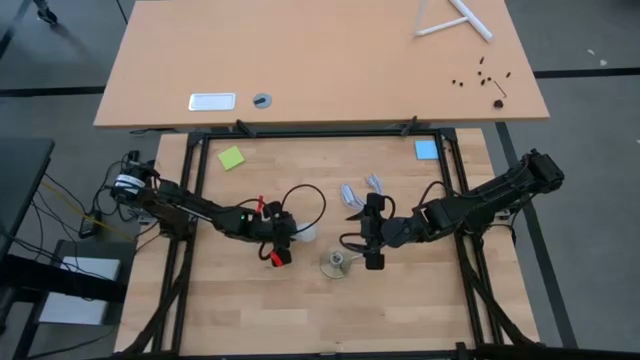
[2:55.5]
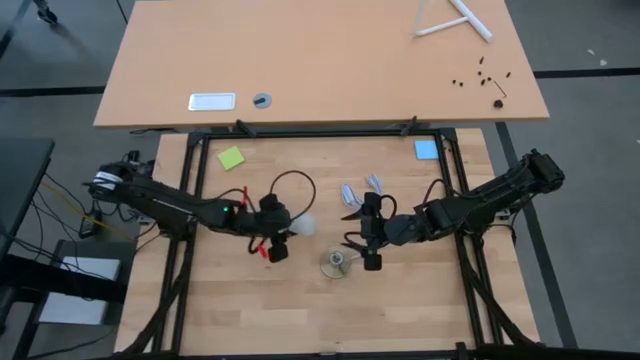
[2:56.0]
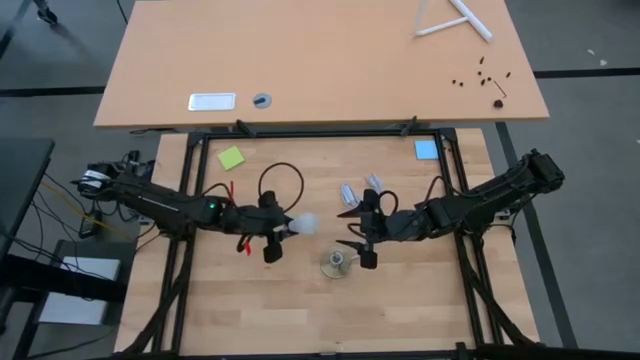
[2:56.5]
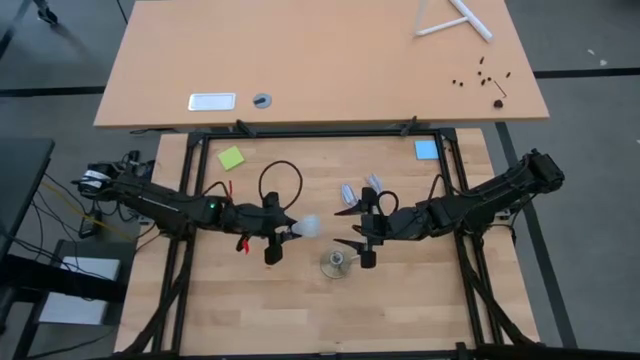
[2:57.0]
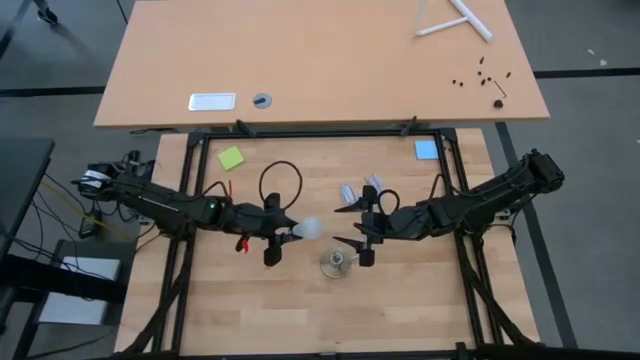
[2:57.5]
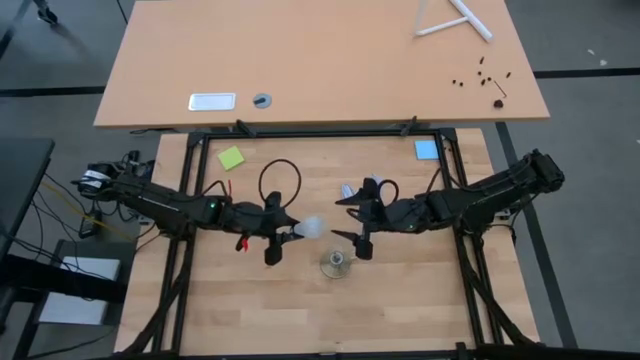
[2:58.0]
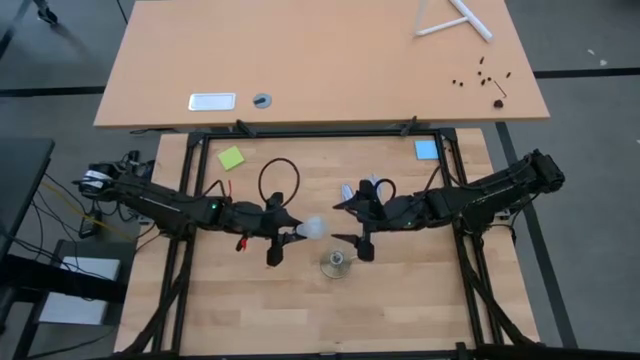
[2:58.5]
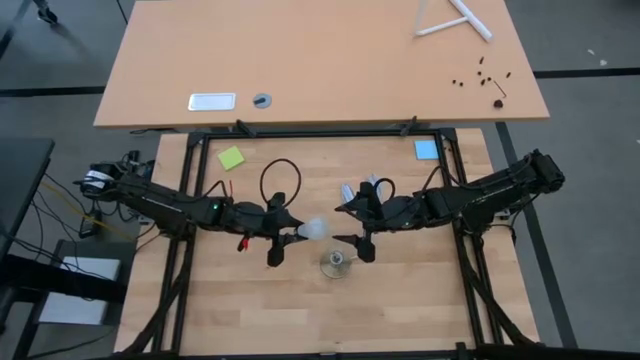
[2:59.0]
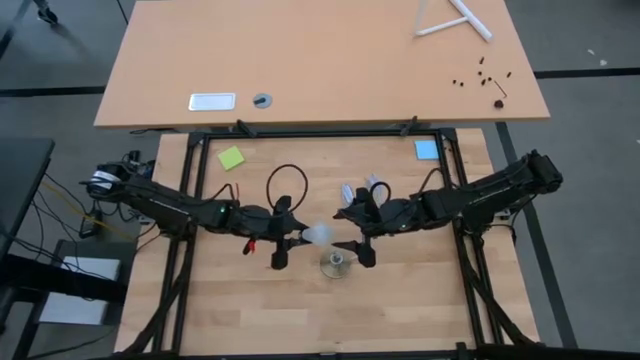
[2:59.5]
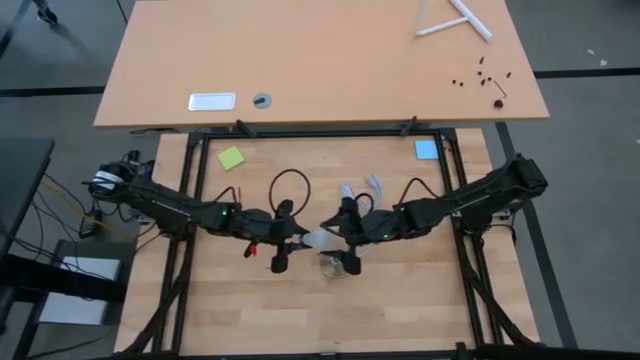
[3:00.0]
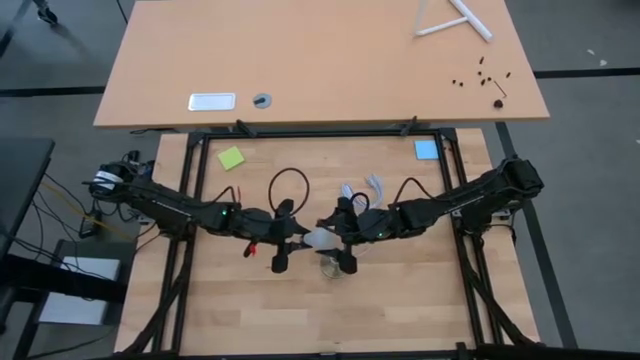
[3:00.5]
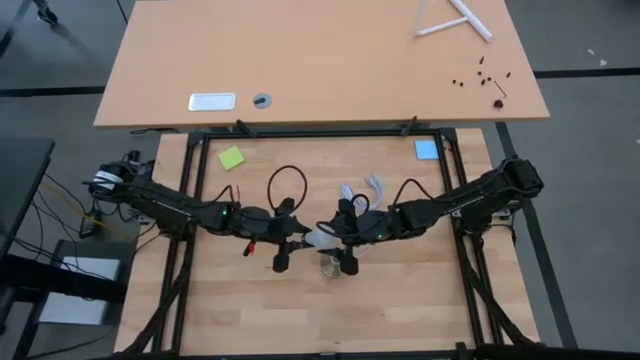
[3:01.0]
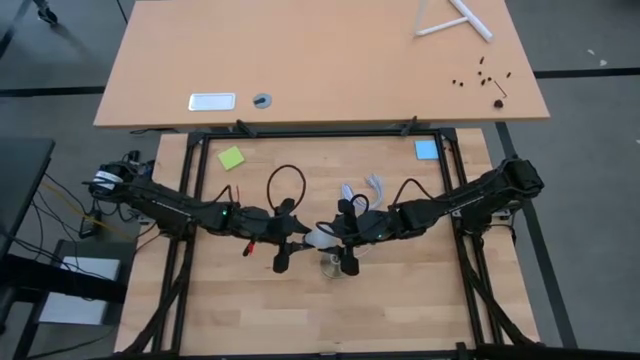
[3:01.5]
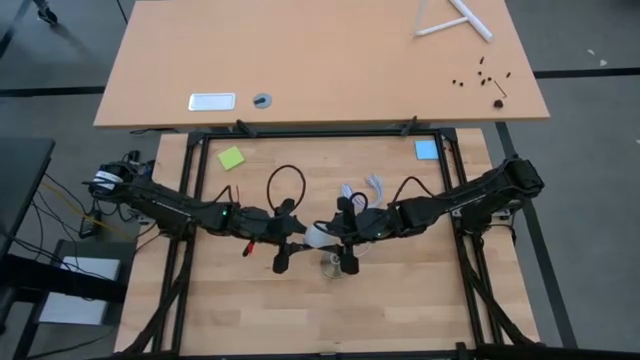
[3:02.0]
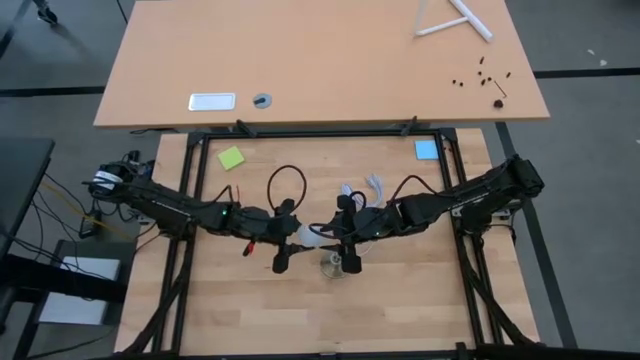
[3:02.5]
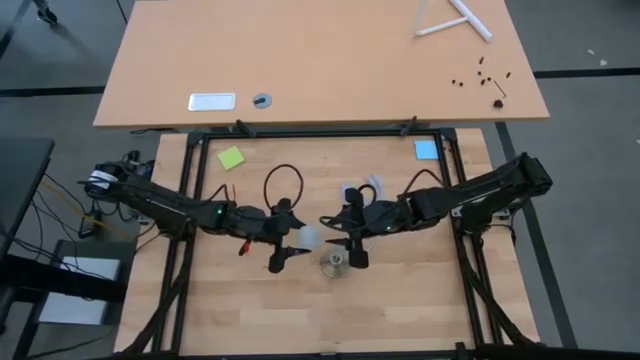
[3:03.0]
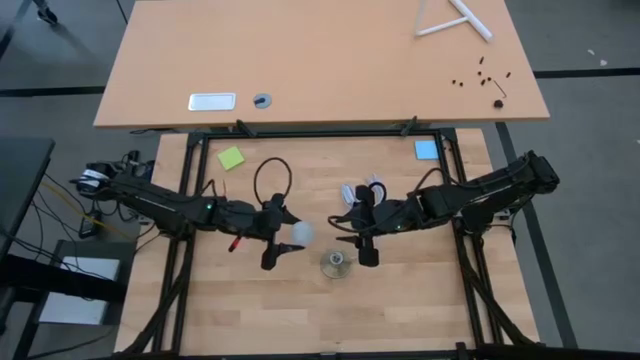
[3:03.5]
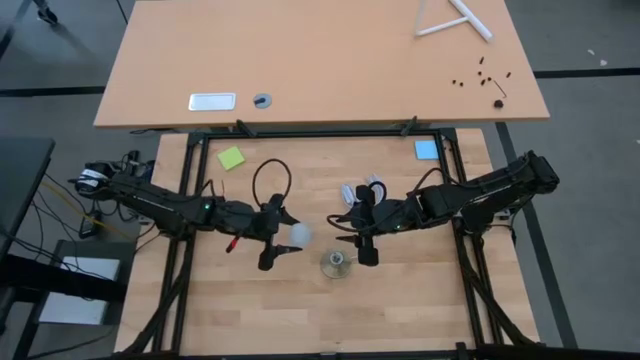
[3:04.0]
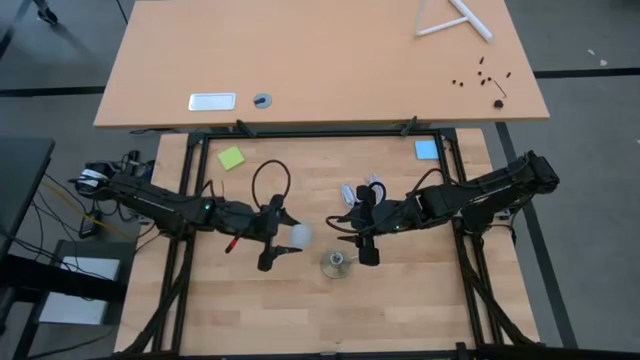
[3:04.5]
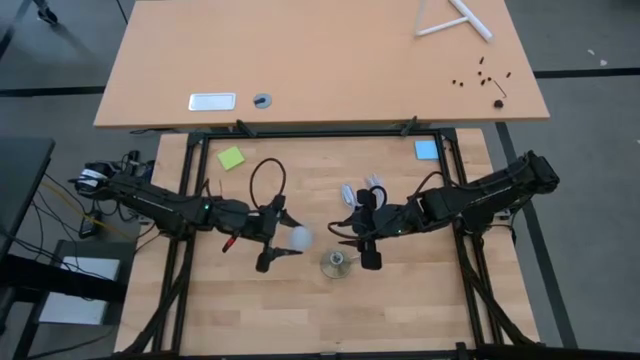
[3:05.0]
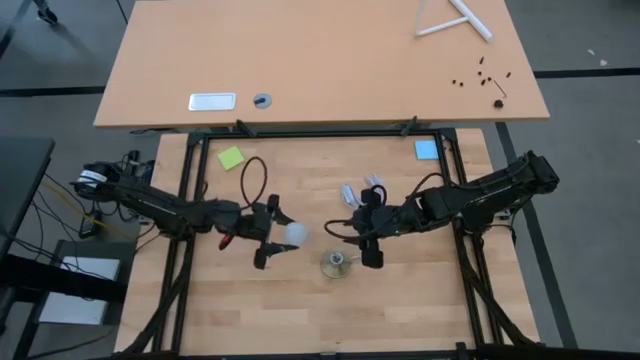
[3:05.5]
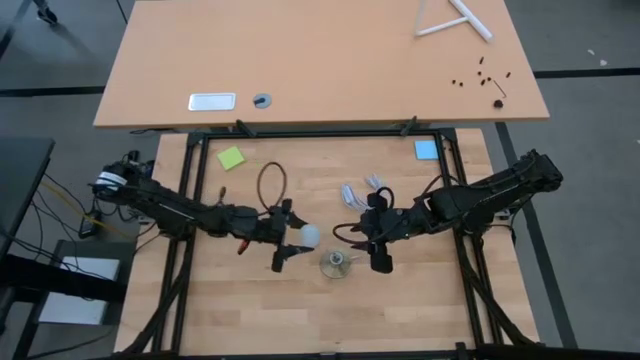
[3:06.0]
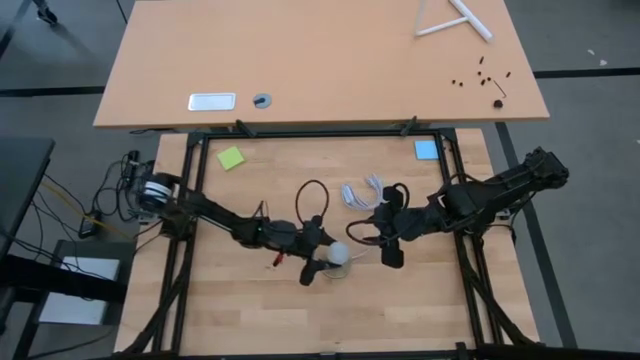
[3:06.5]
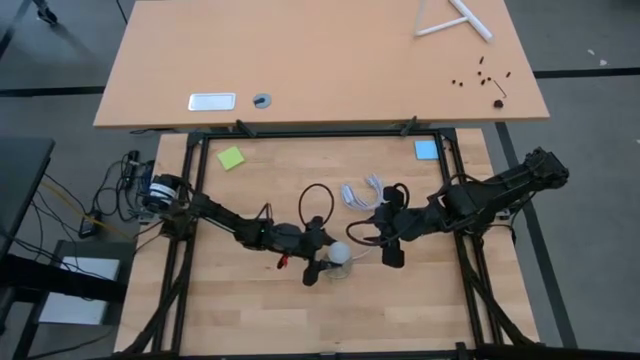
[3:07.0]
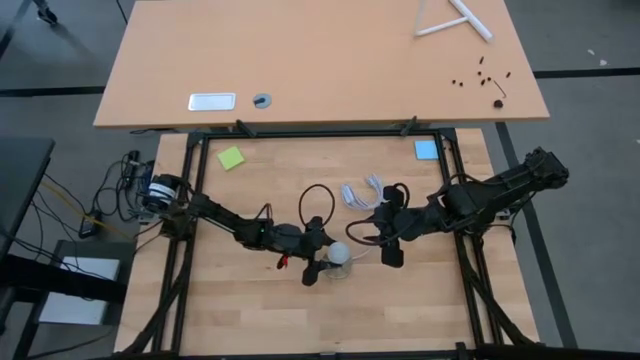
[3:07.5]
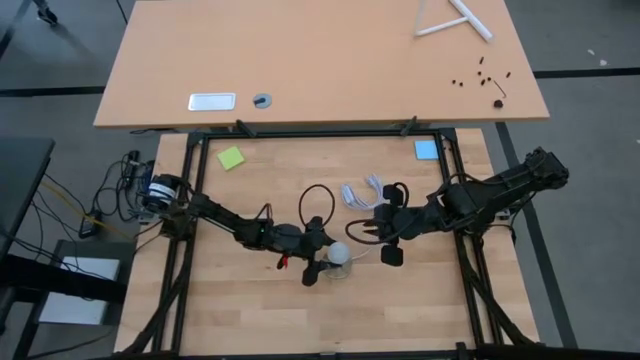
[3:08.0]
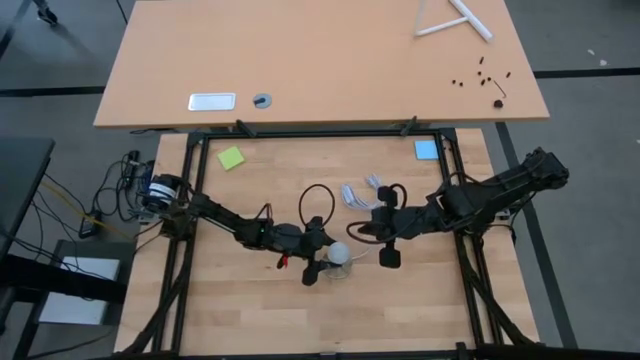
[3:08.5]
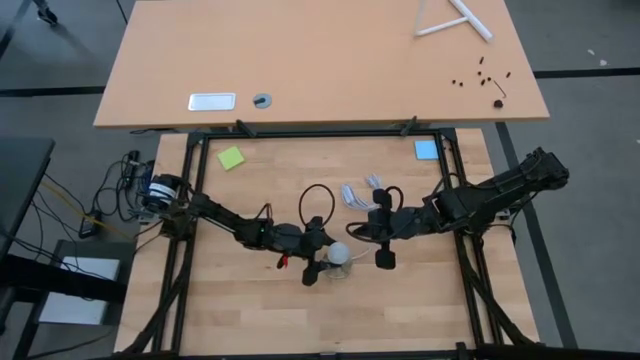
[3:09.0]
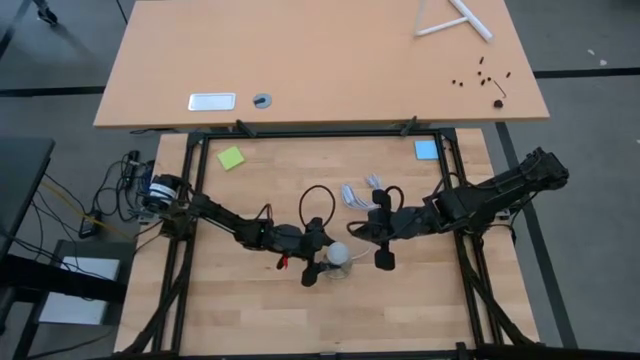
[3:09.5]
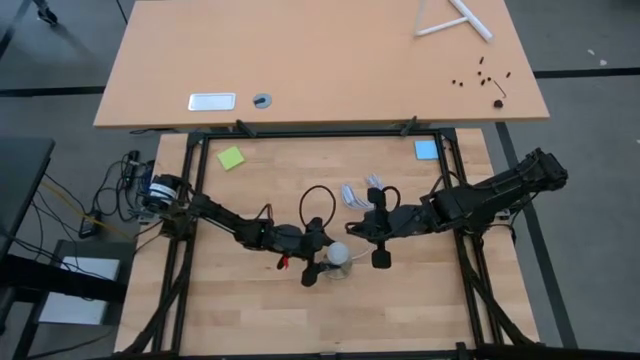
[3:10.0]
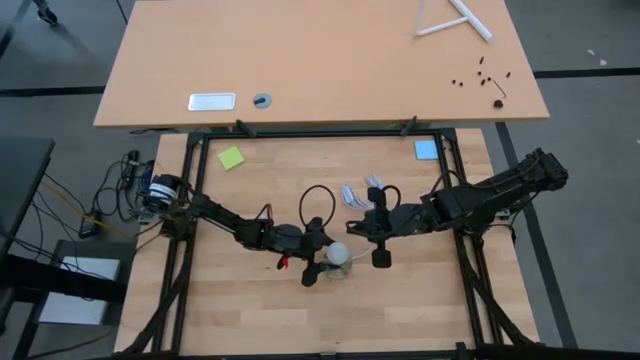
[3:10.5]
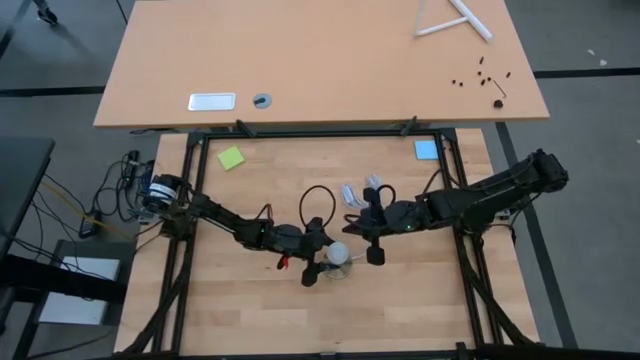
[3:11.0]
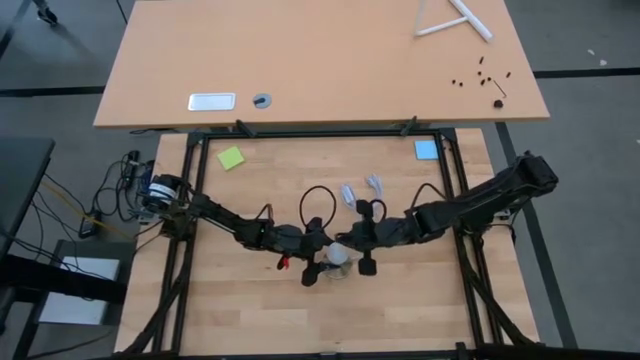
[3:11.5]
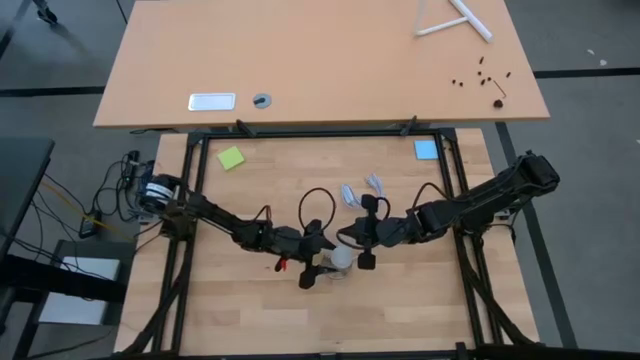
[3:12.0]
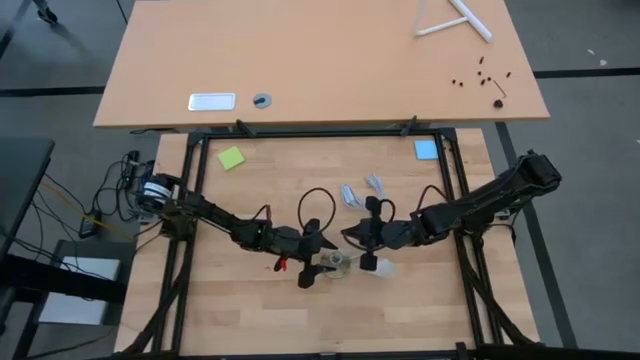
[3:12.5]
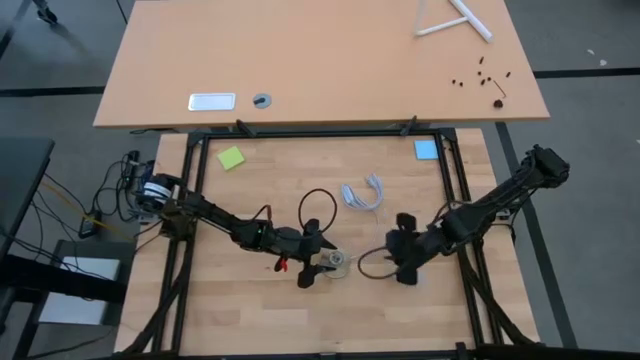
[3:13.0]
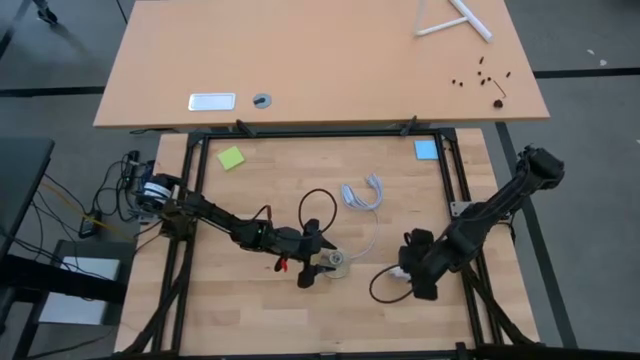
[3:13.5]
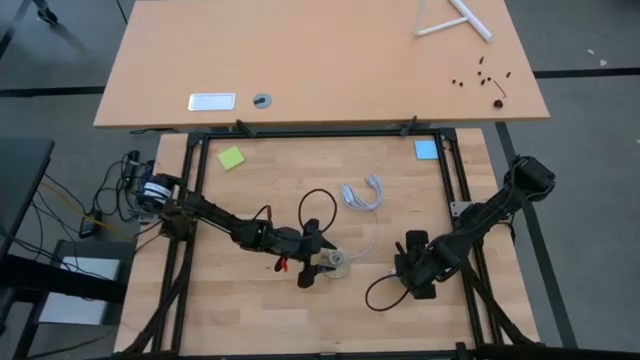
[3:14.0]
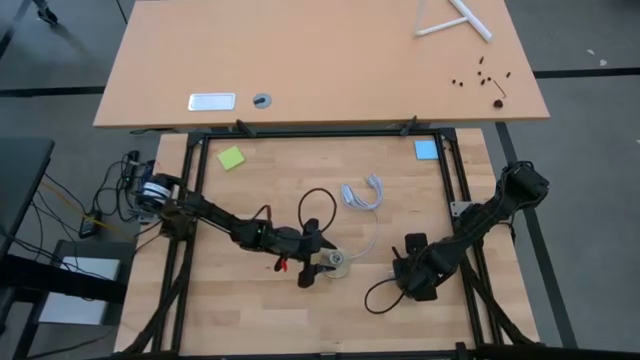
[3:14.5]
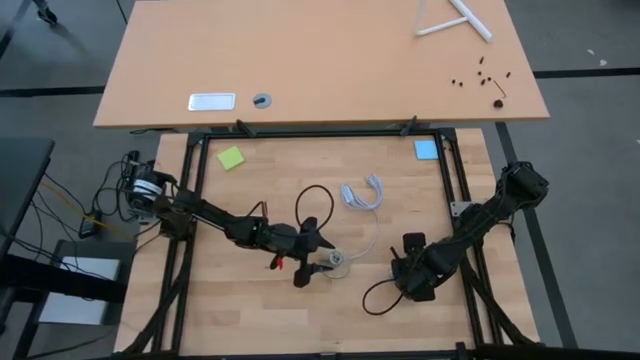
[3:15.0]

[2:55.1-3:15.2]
Task: Screw lightbulb
Insert the lightbulb into the lamp
